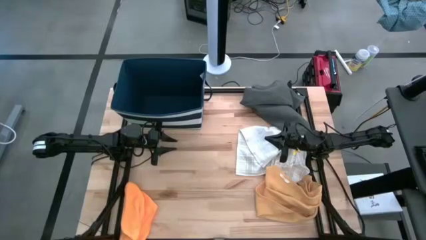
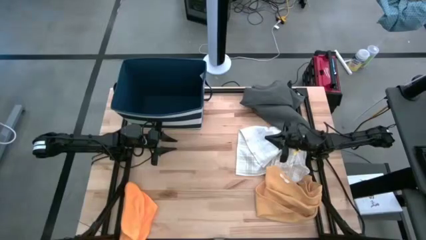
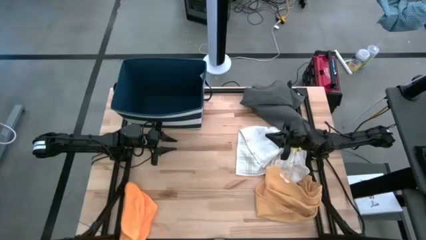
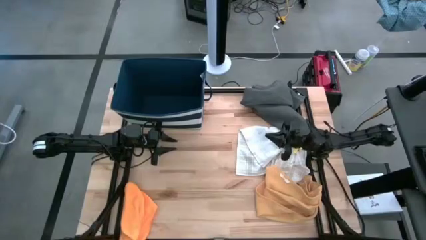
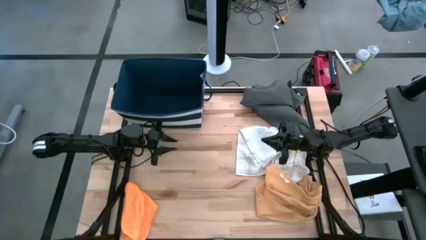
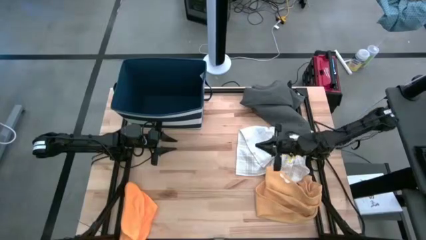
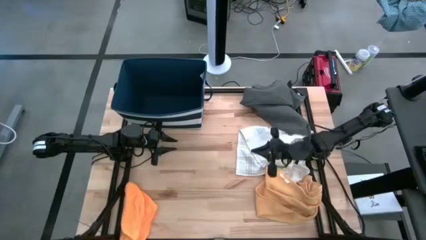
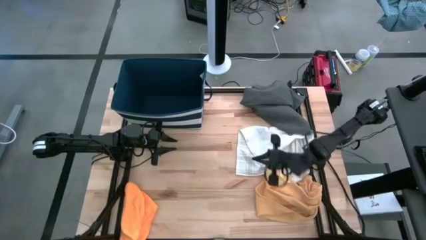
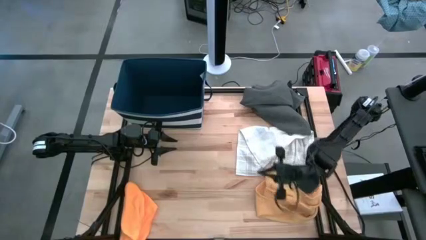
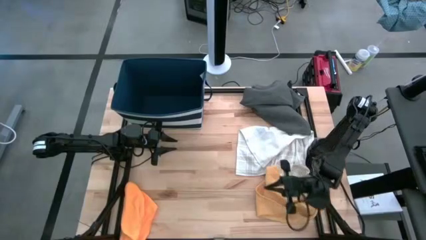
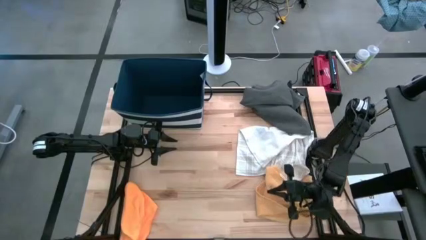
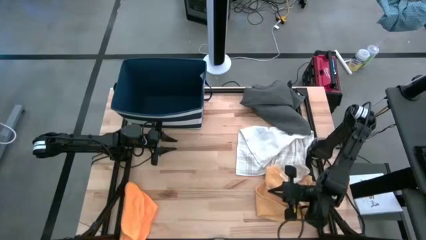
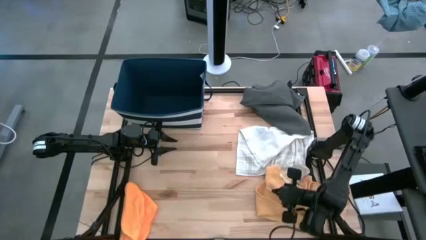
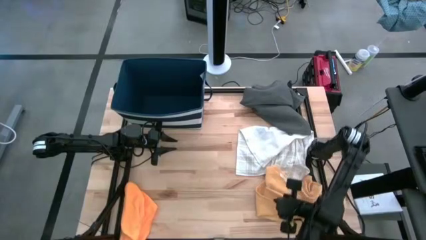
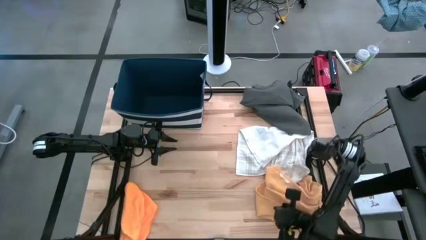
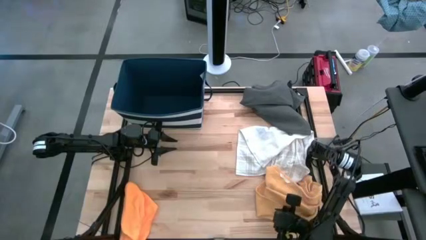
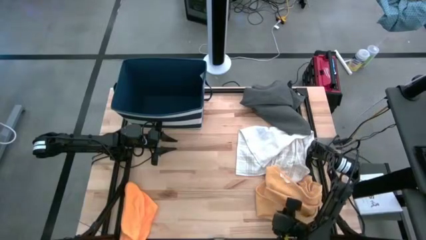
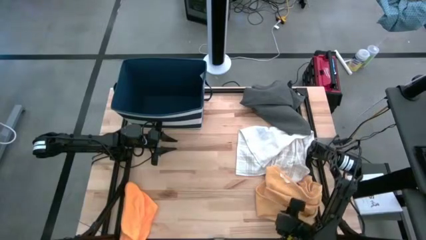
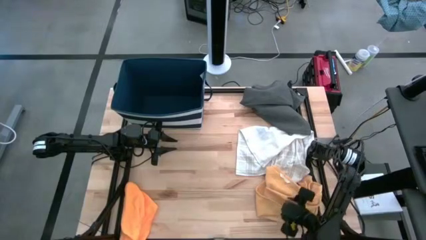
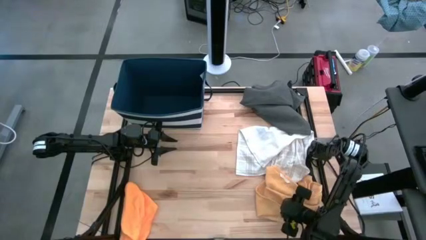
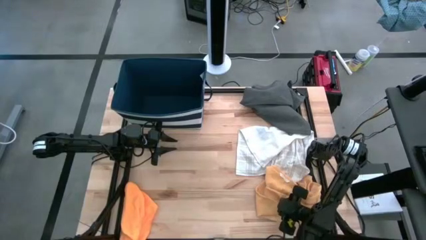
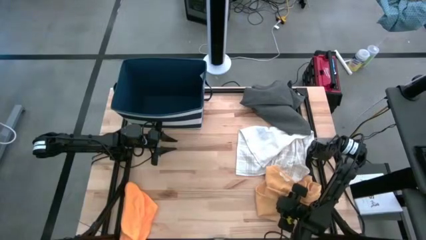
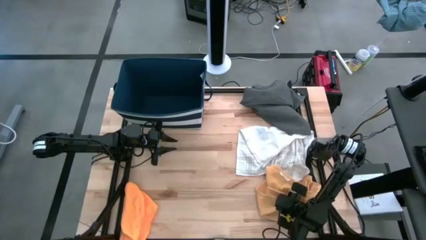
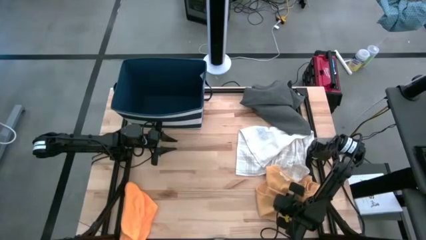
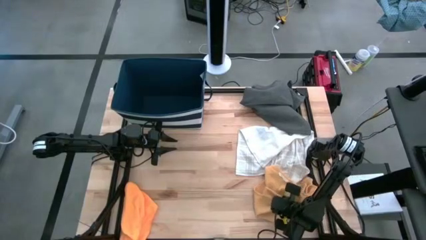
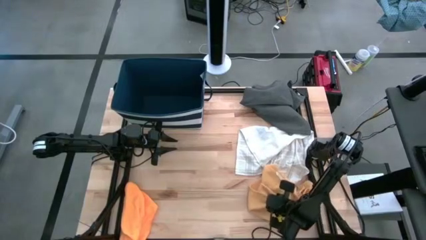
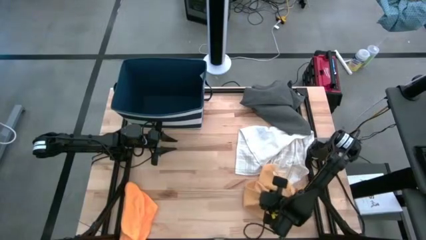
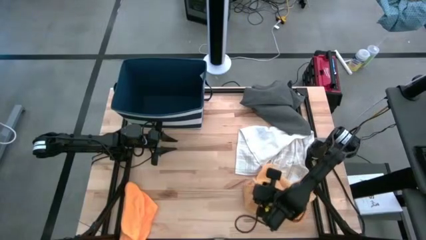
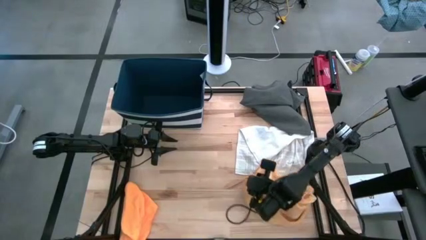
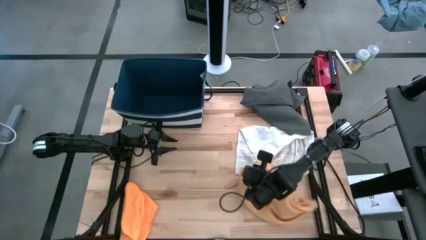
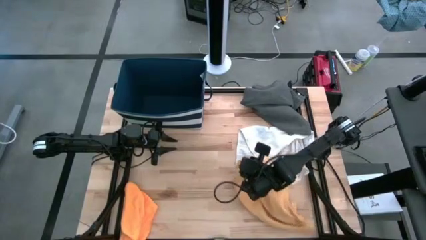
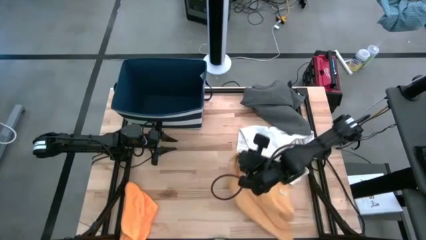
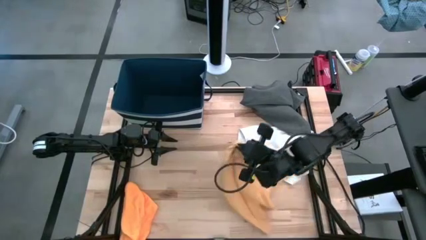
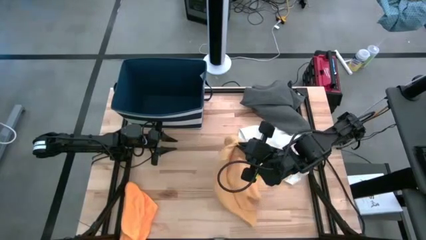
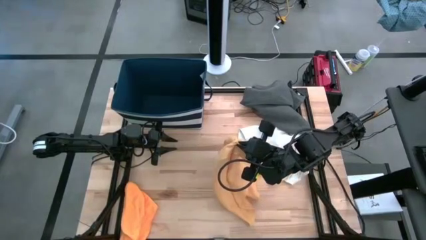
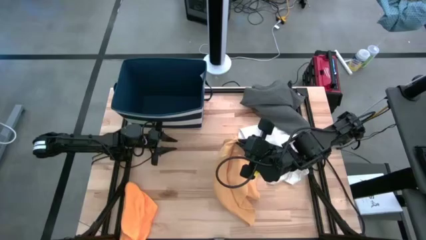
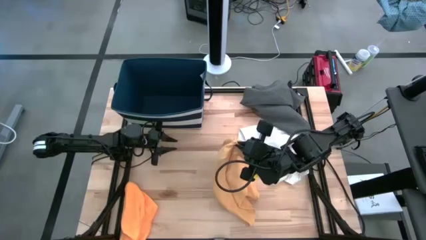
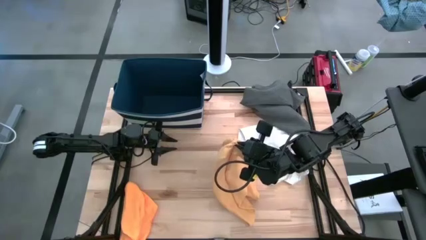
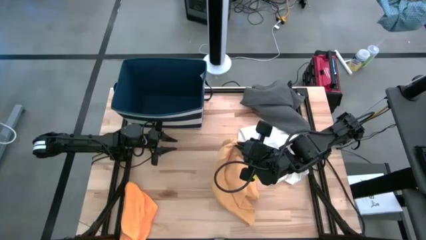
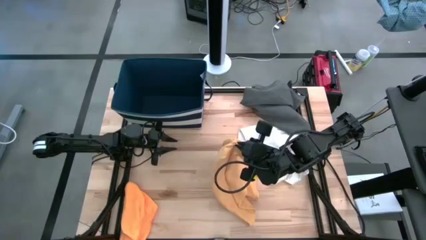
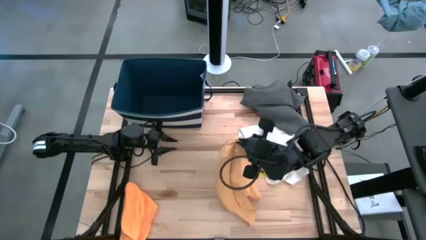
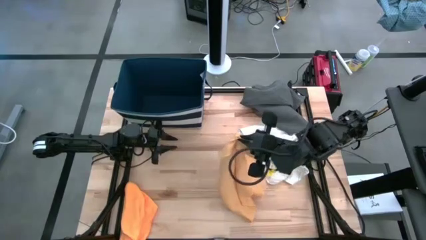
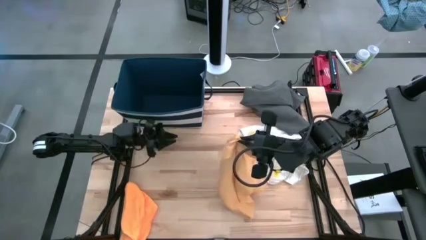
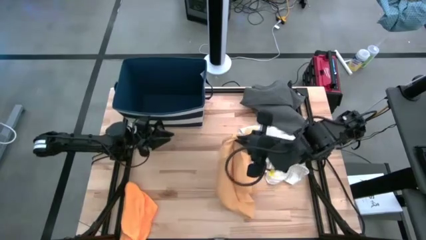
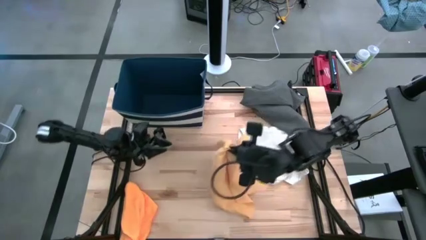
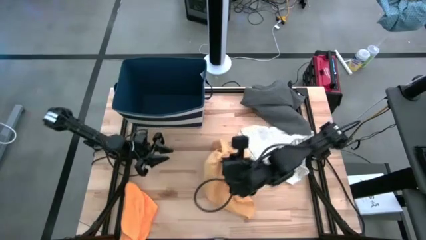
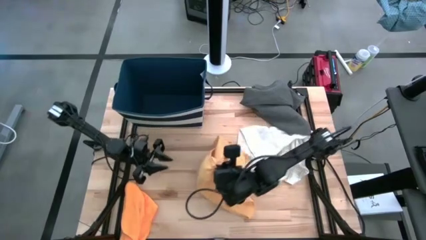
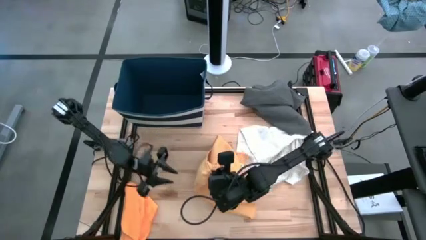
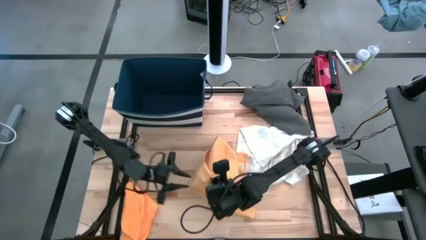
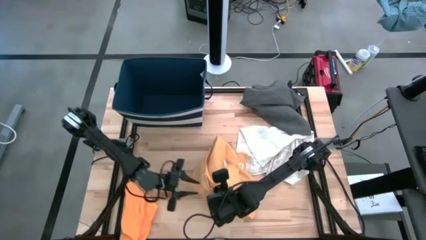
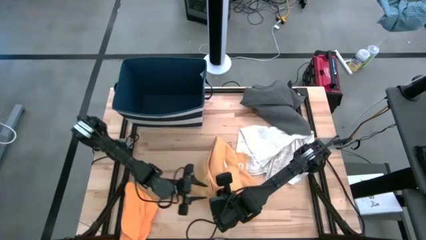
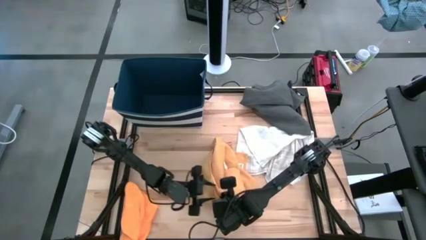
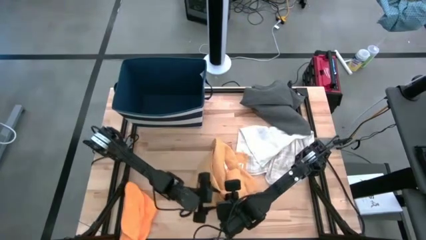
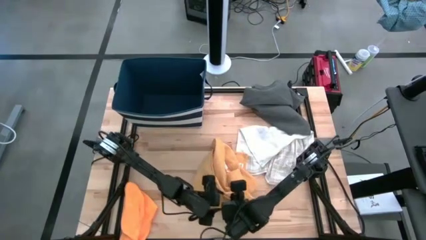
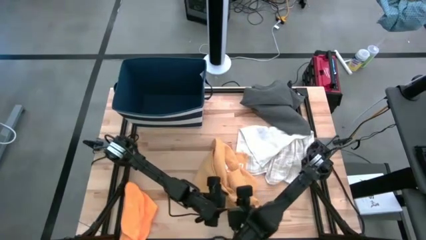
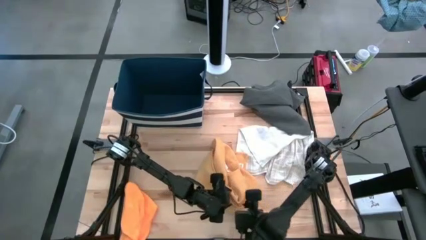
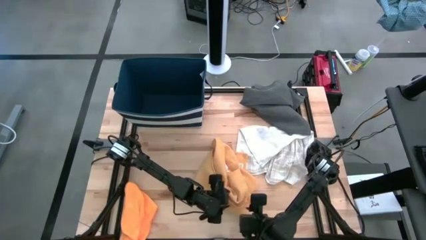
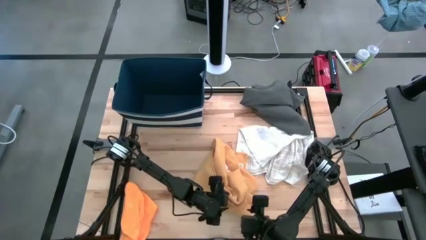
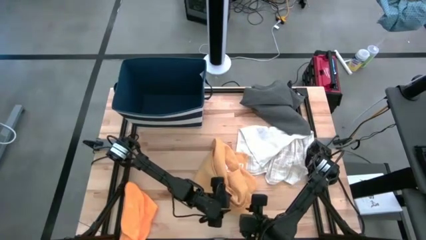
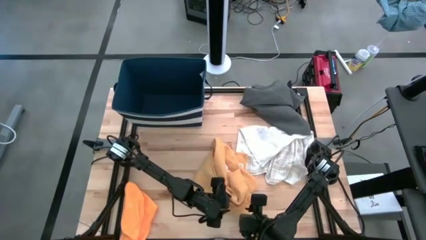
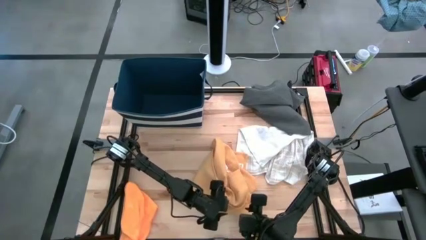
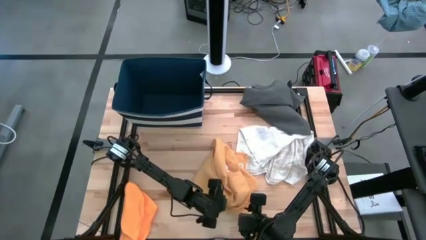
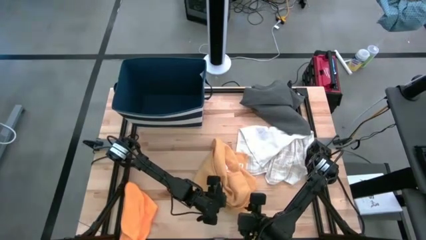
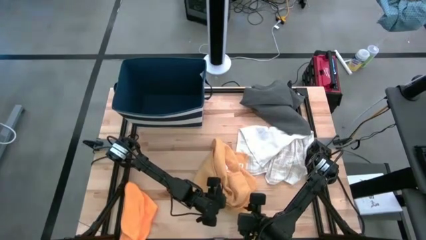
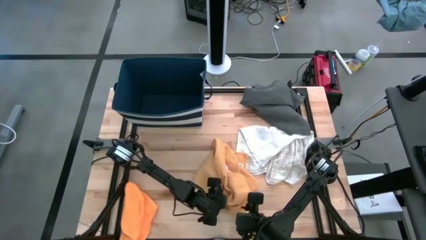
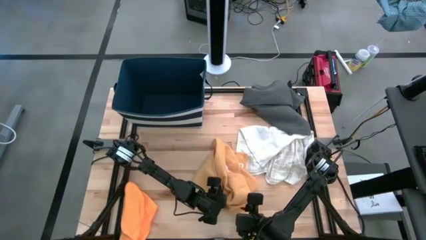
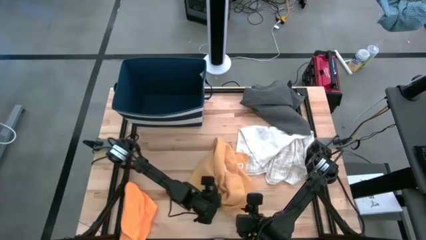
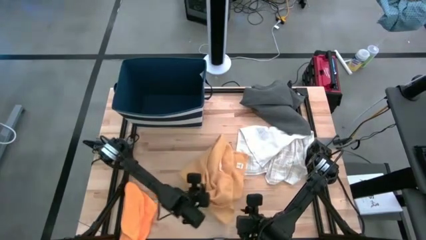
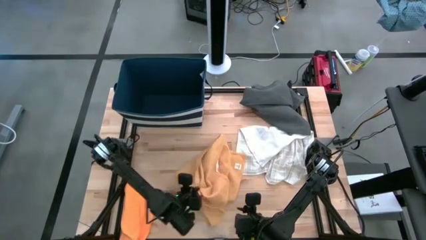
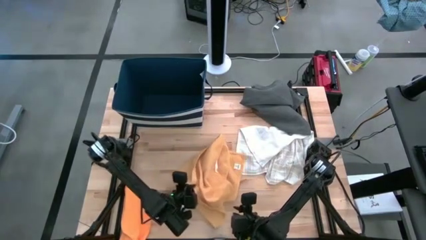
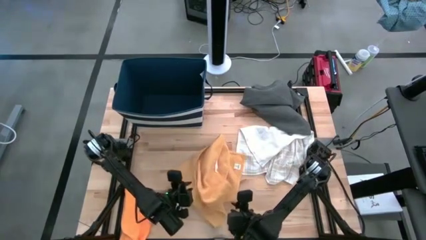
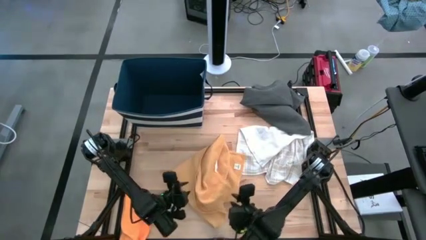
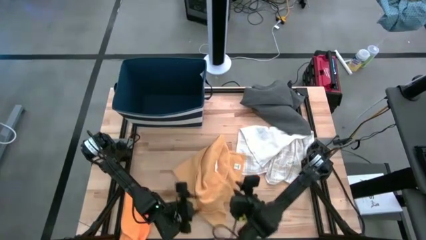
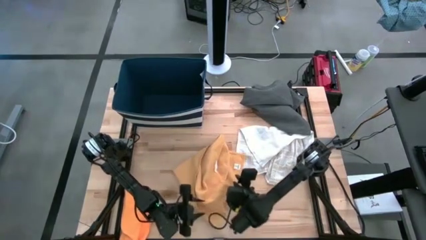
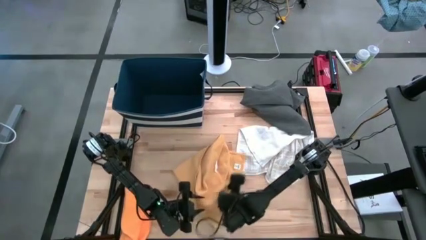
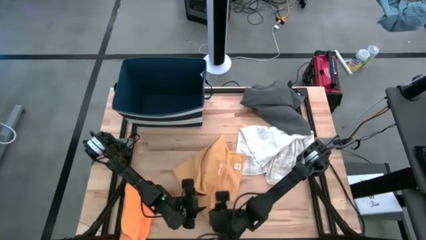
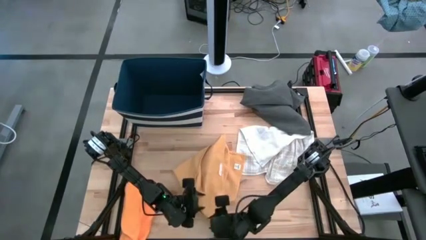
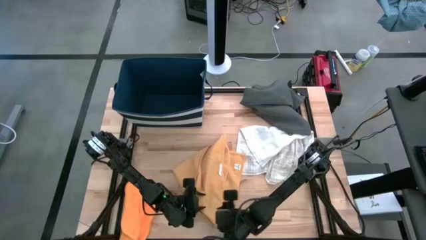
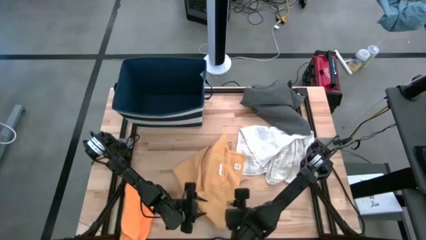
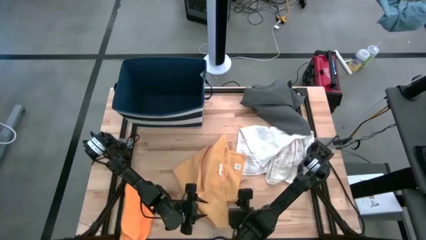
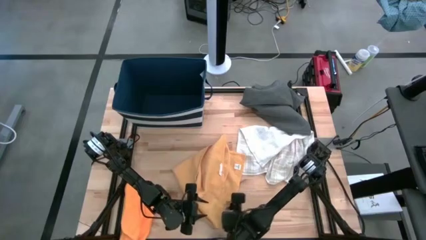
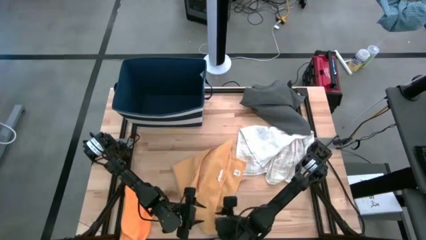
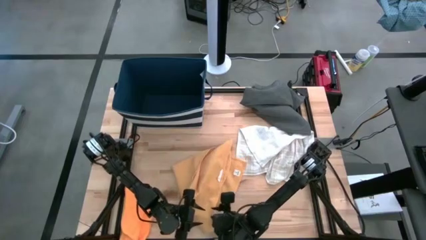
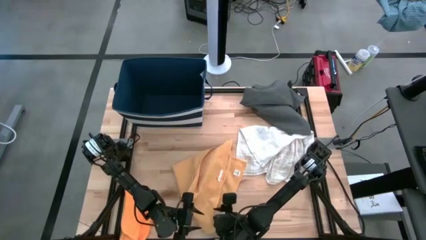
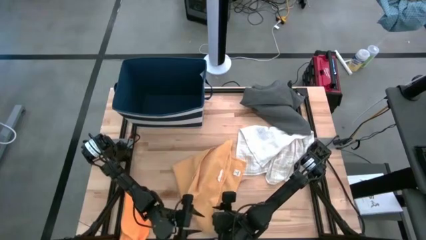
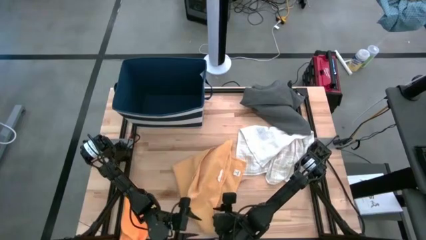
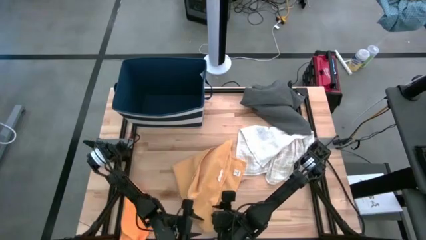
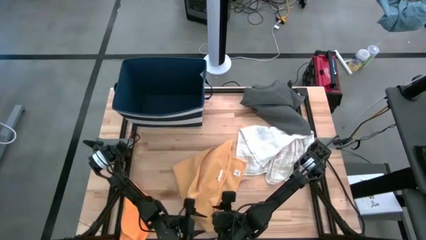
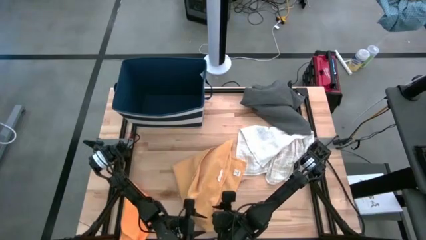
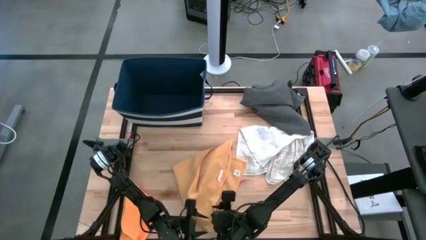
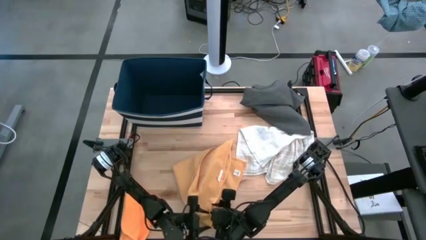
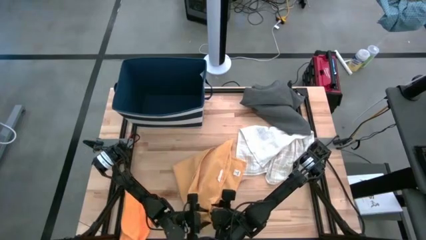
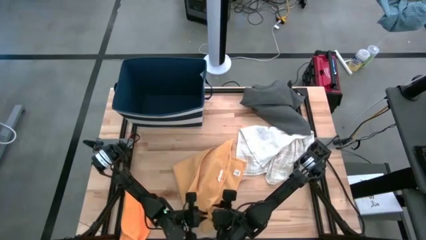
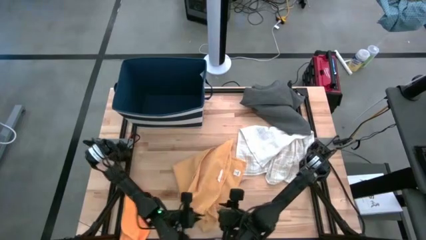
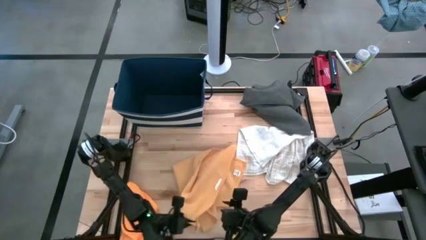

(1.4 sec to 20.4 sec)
Task: Fold towel
Fold the yellow kitchen towel
